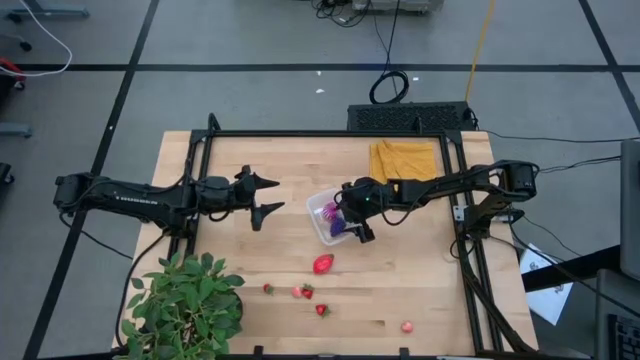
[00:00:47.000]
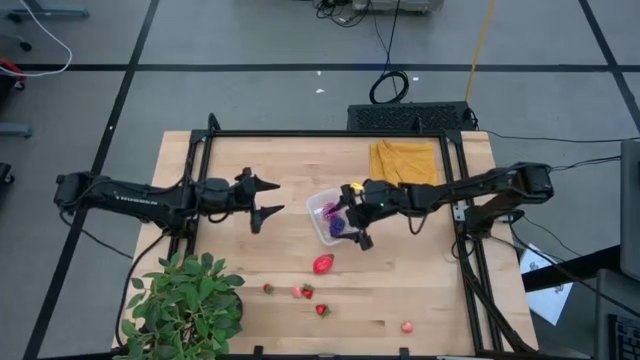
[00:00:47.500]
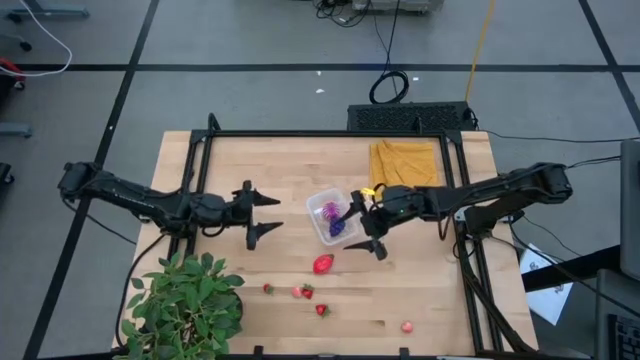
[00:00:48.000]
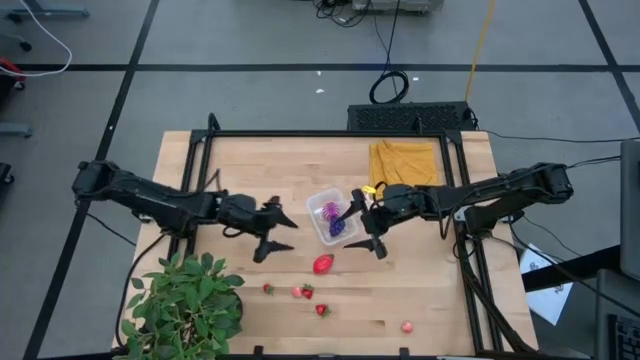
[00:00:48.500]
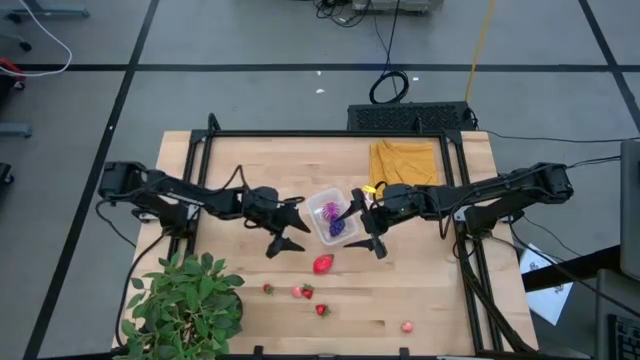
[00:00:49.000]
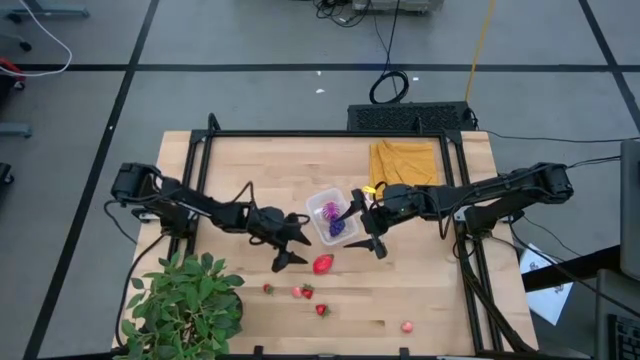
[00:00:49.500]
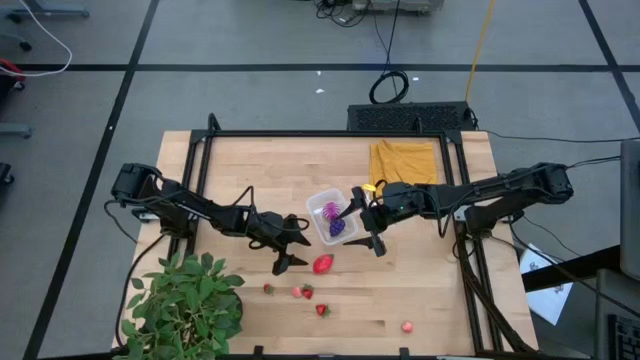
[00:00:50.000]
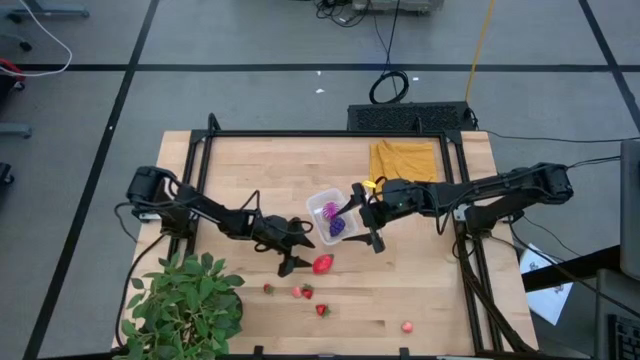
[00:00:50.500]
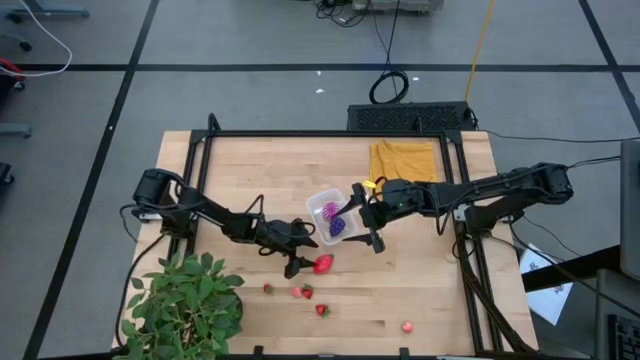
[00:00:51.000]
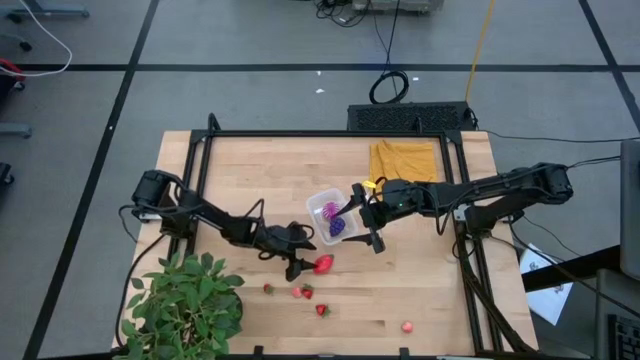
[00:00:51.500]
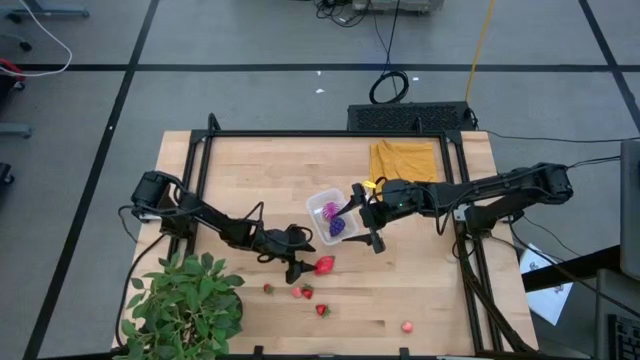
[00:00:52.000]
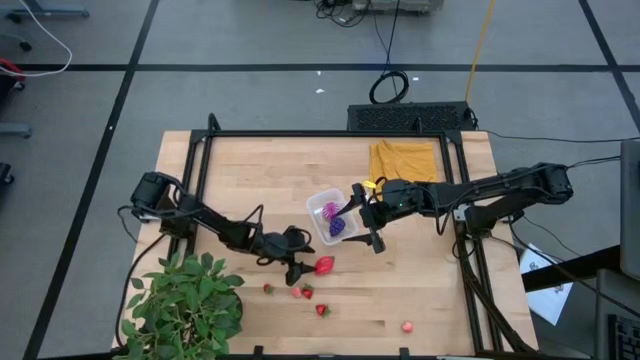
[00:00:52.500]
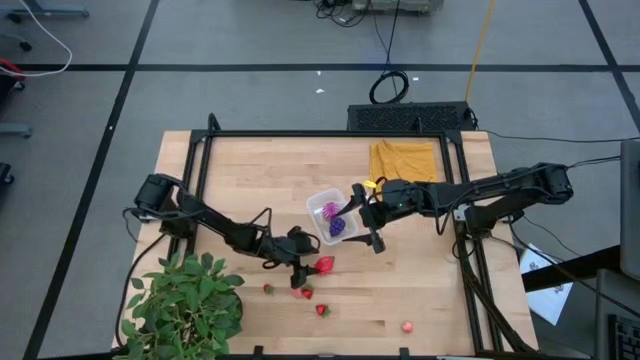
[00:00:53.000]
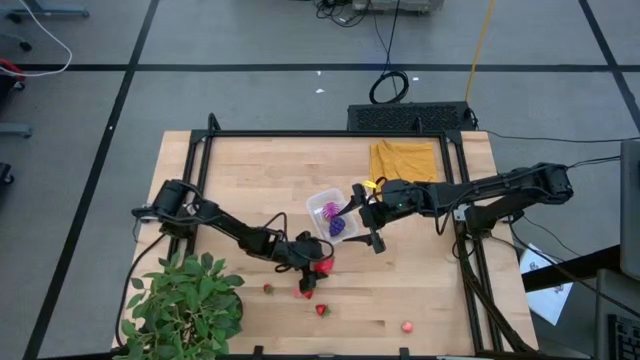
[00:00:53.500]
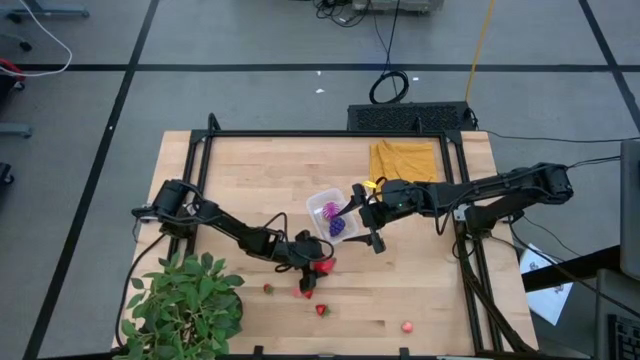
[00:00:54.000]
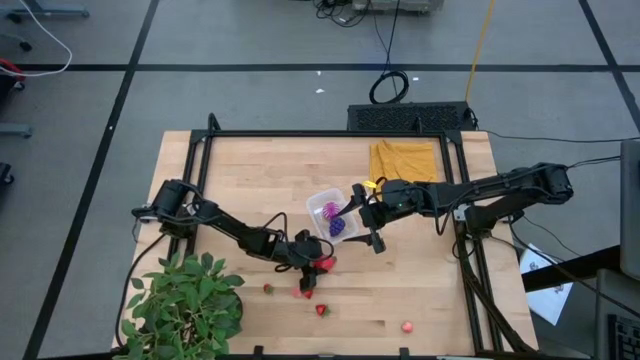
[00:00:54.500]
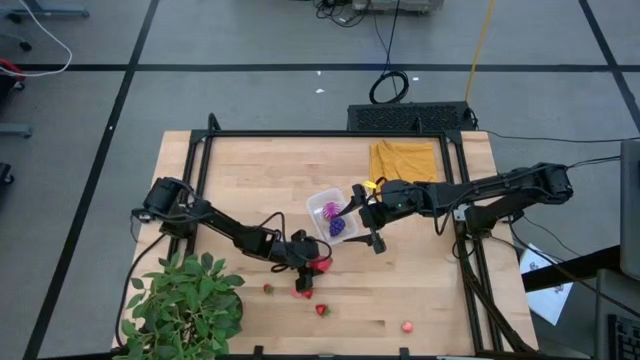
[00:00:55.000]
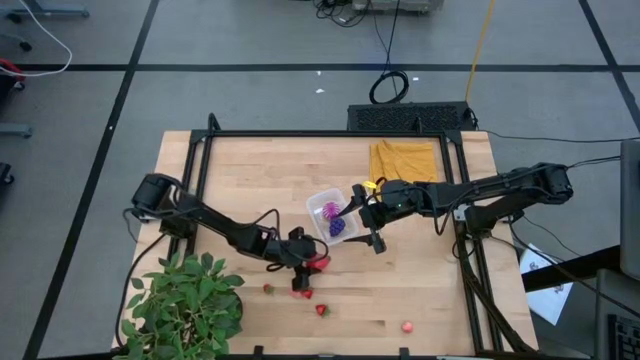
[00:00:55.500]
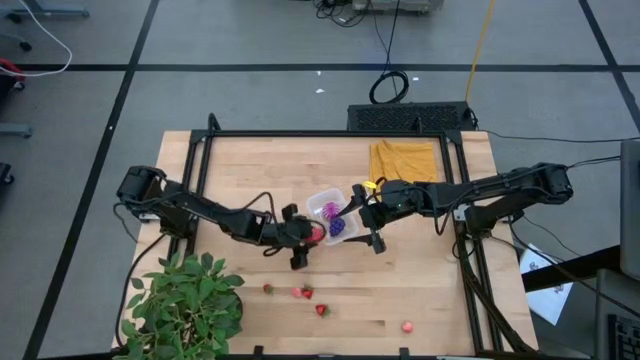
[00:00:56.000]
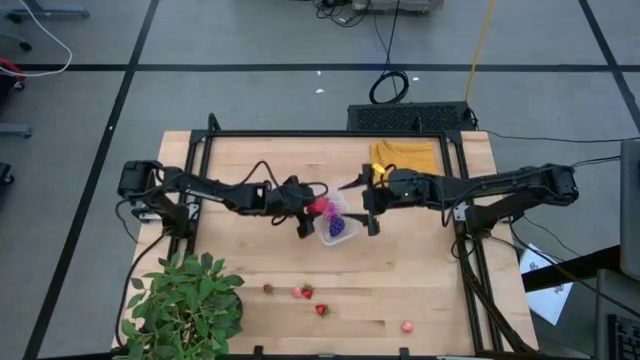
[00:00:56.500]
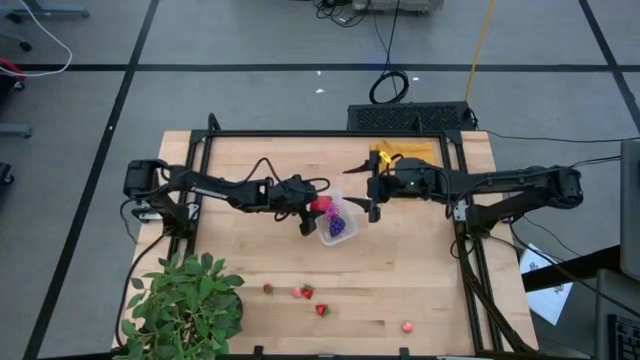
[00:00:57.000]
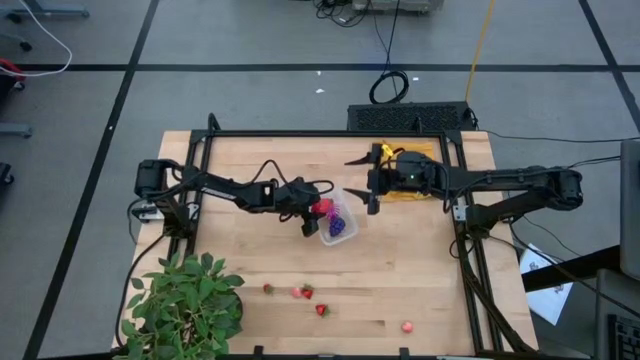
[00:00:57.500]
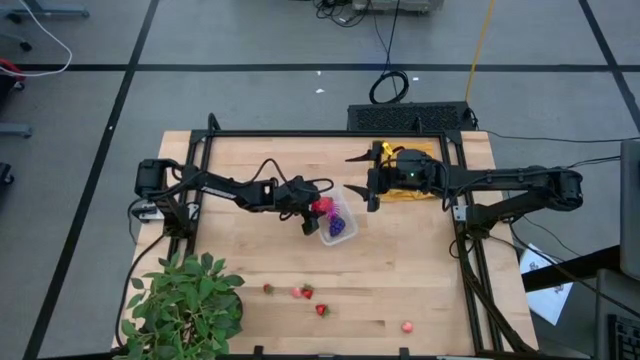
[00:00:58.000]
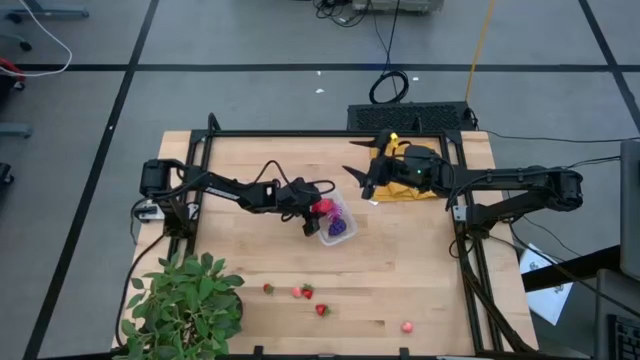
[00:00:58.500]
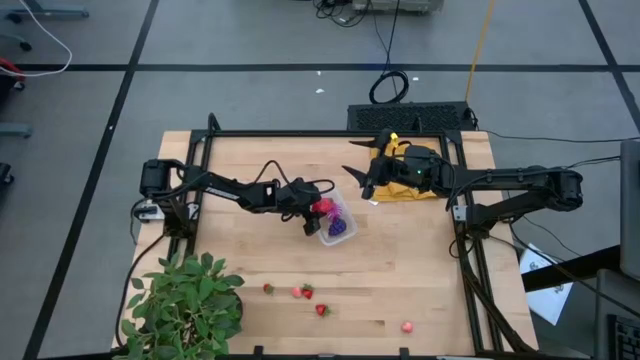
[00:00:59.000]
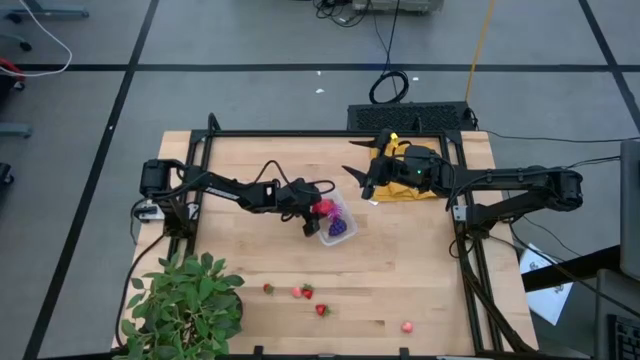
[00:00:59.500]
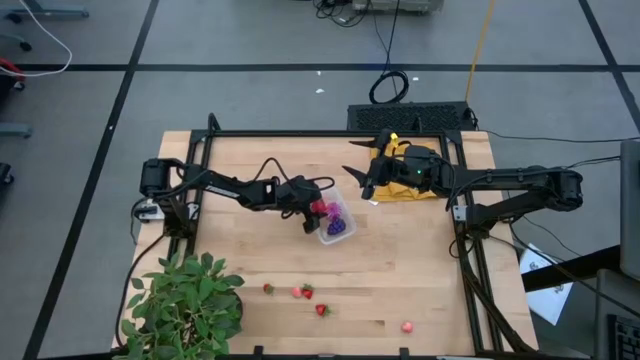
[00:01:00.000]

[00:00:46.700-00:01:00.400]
Task: Pick and placing Produce into tupperware
Put the red dragon fruit into the transparent container

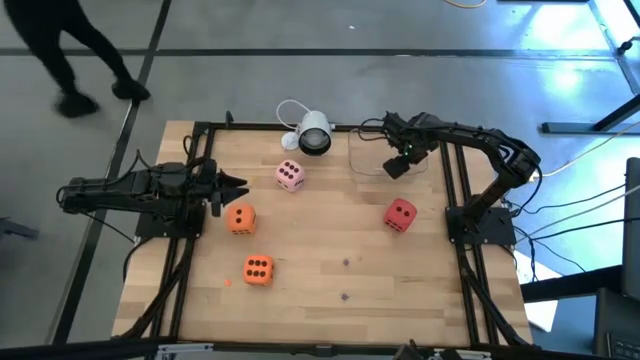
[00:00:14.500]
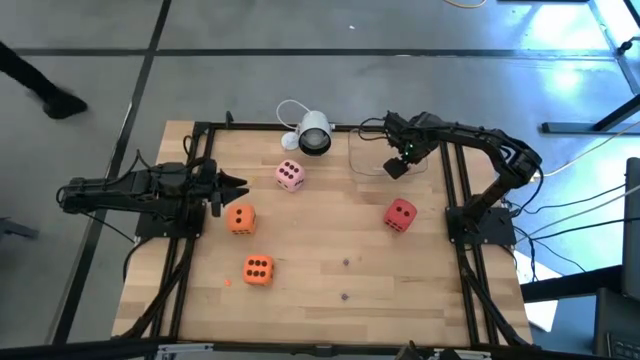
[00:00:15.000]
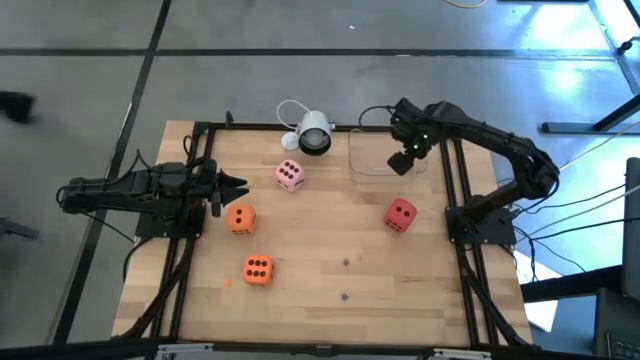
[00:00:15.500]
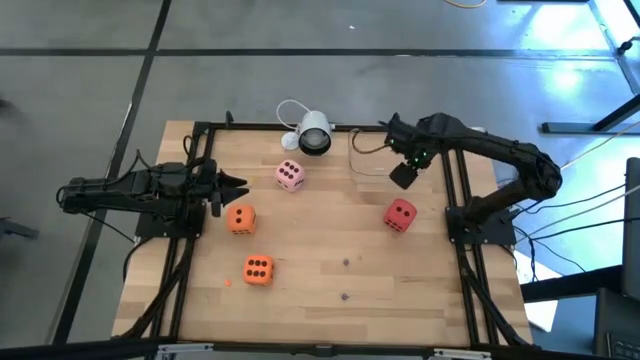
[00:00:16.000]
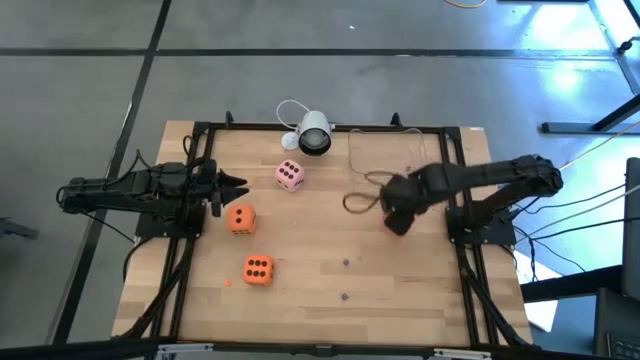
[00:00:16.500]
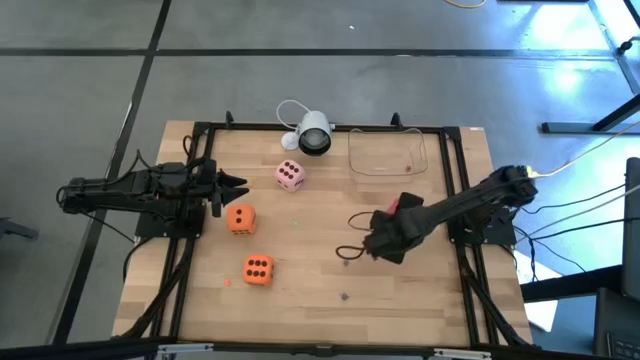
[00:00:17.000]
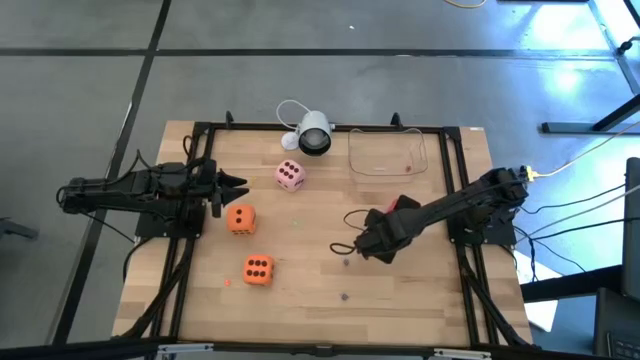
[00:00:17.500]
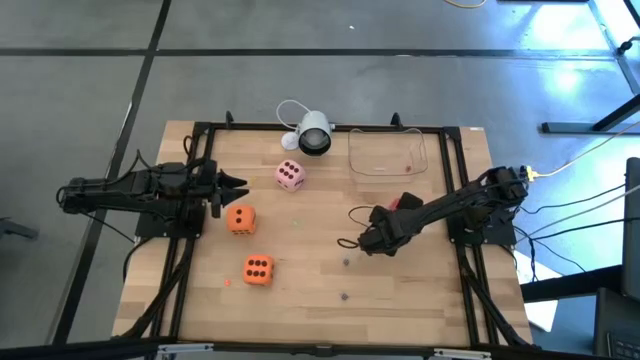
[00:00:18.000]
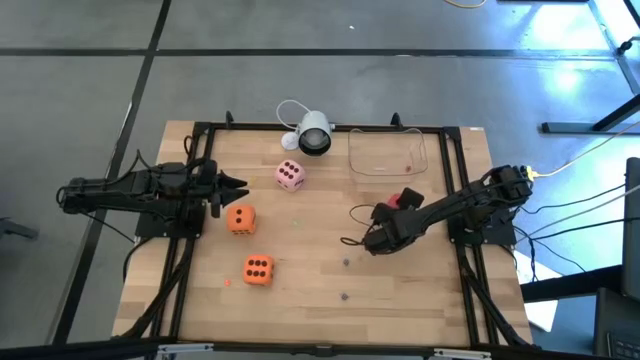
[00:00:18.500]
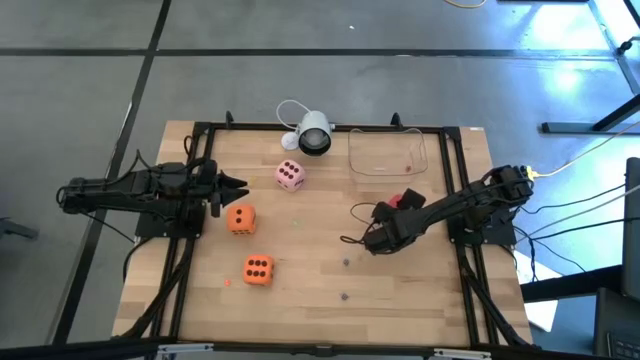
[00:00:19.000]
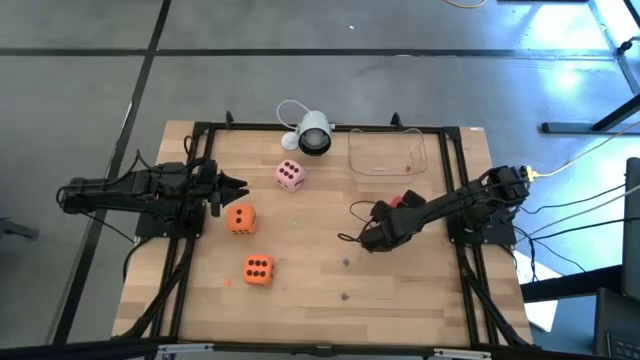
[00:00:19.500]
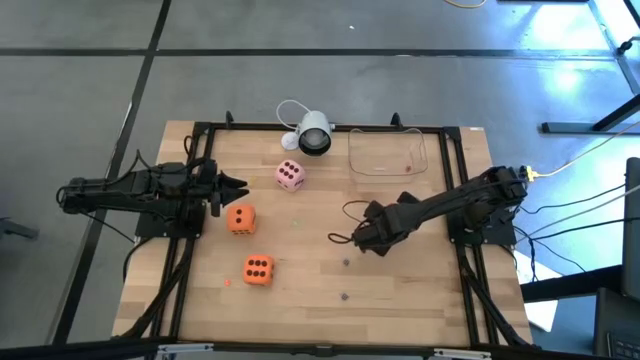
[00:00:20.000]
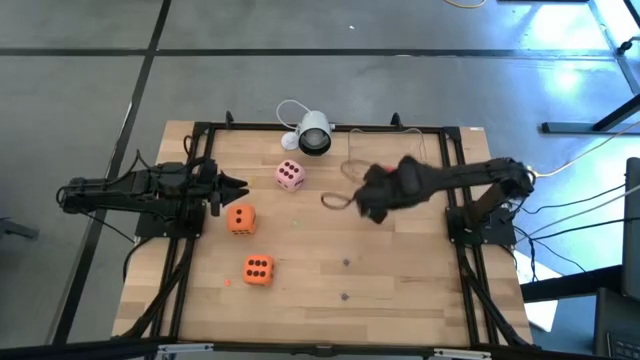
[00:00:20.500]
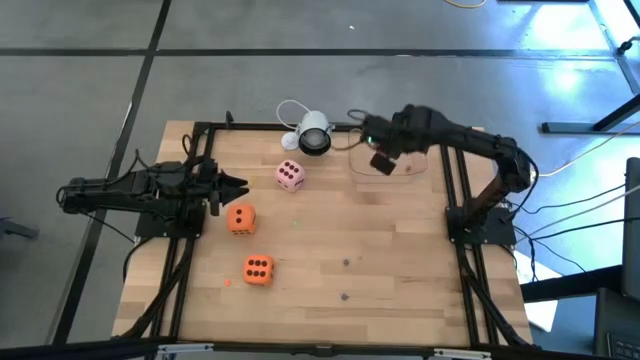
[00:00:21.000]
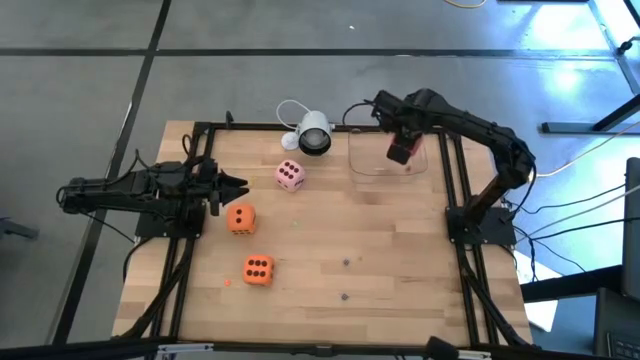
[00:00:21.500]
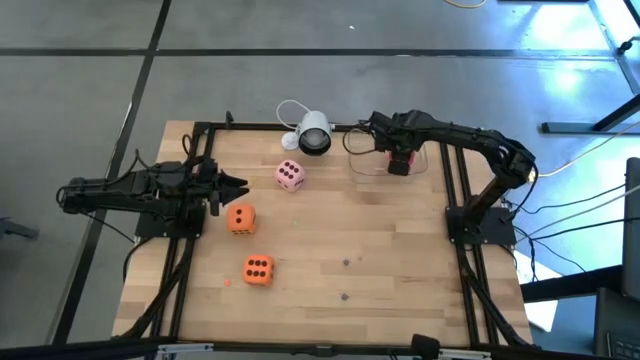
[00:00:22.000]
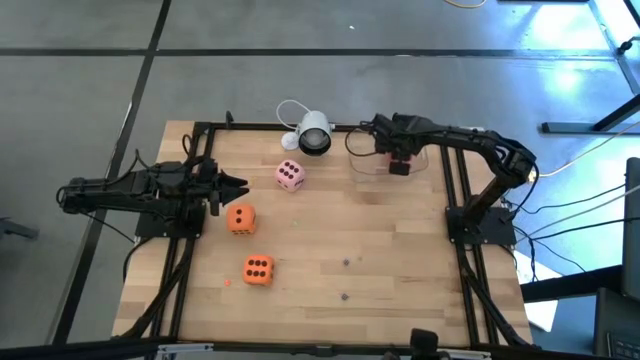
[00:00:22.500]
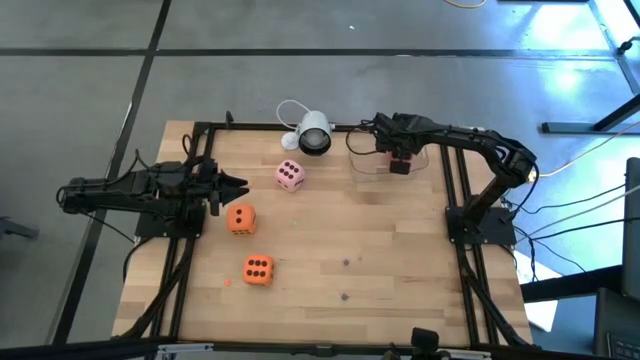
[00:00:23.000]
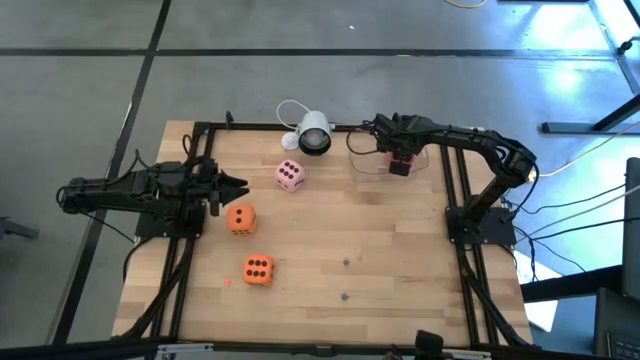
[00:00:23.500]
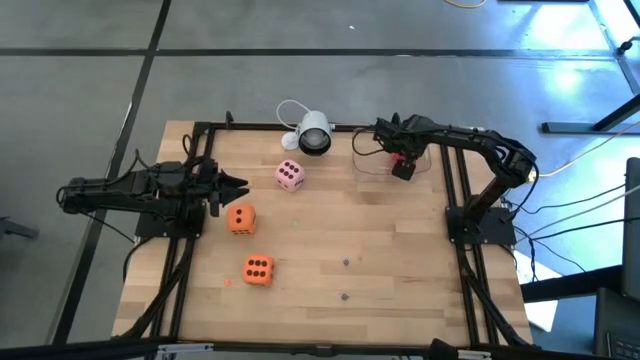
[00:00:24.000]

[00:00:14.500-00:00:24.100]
Task: Pick & Place Dice
Put the large red dice into the transparent container
